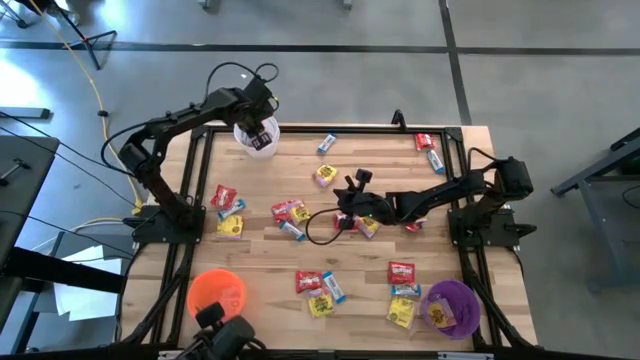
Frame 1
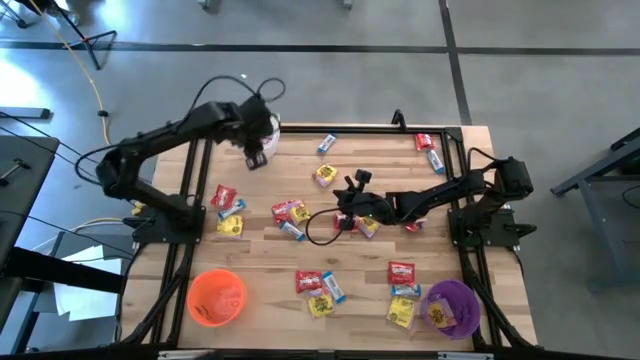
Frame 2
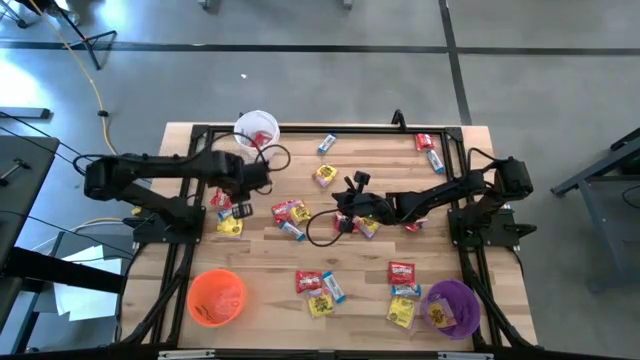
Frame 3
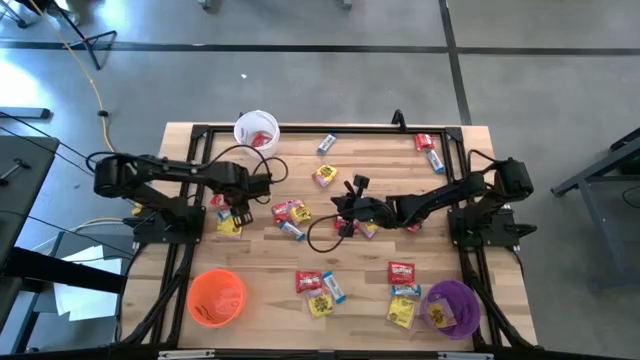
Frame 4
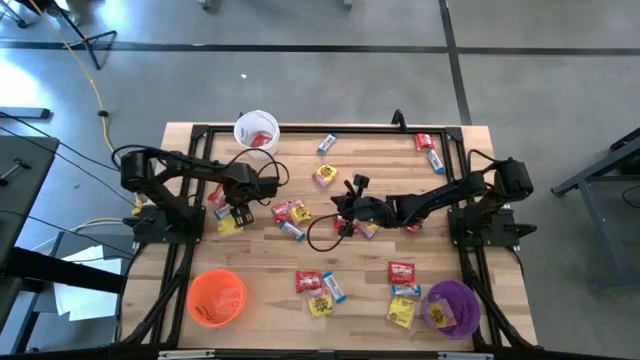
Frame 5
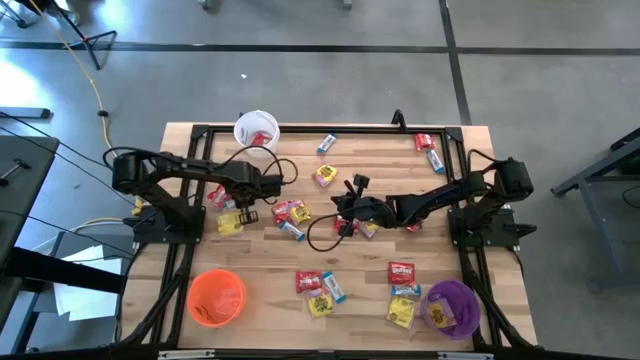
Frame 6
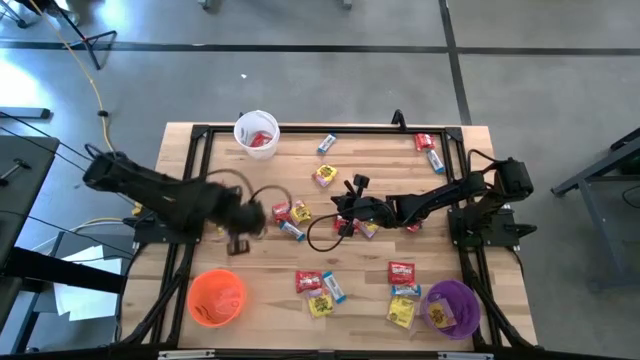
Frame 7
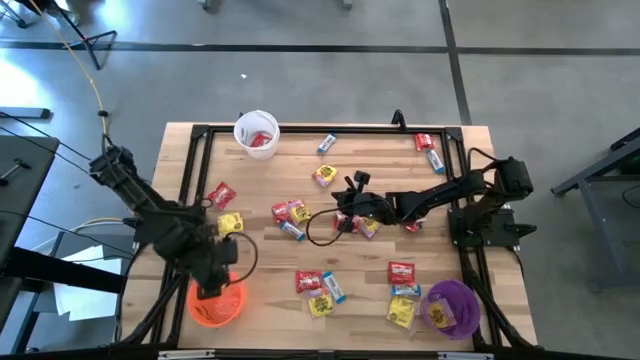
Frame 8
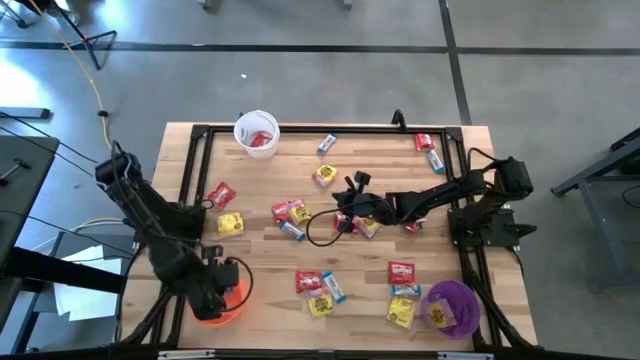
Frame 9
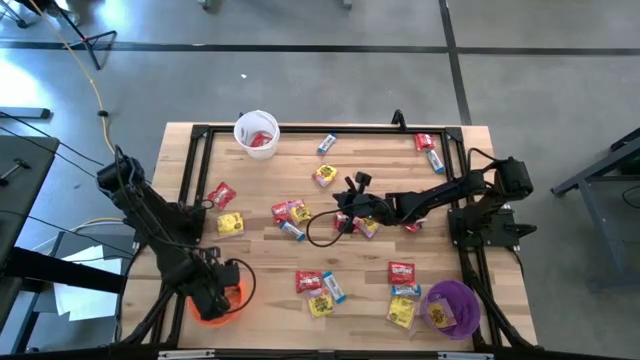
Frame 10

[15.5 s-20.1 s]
Task: Sort candy
Put the white candy into the orange bucket

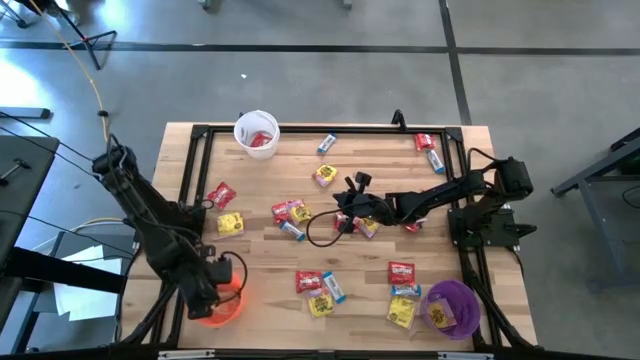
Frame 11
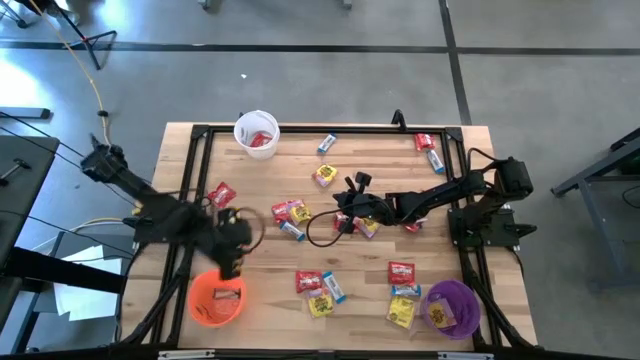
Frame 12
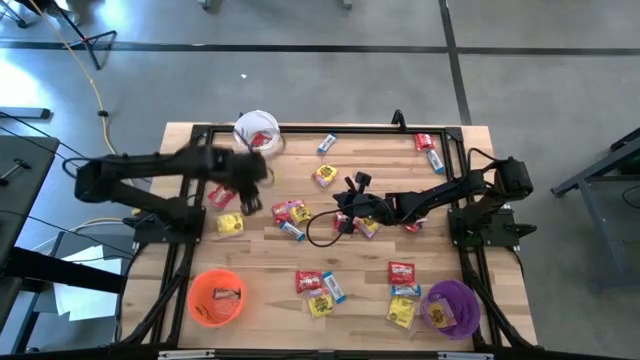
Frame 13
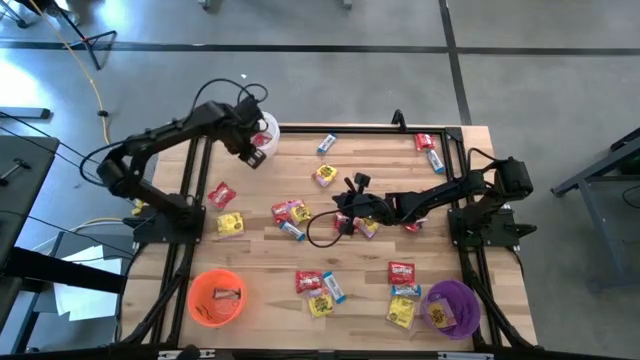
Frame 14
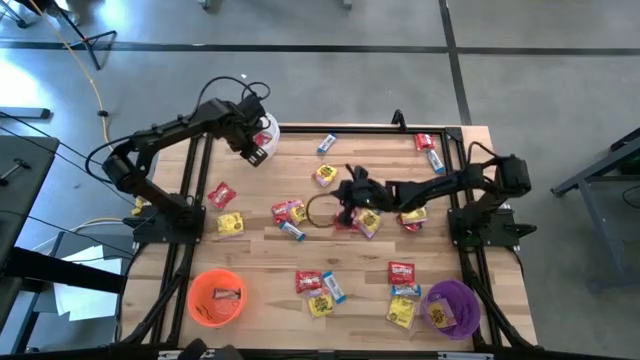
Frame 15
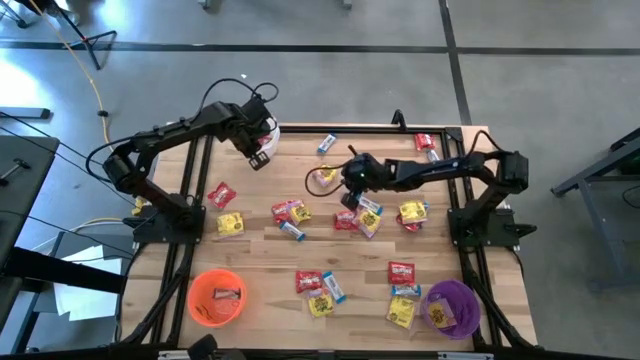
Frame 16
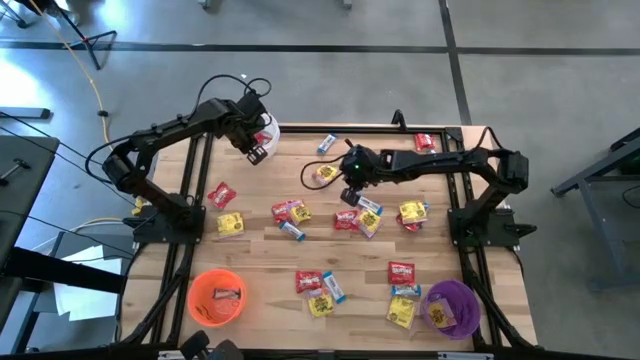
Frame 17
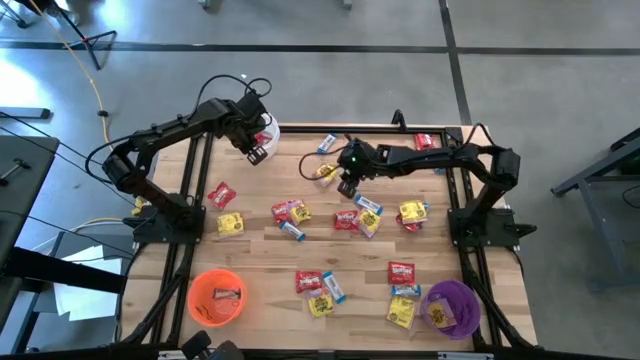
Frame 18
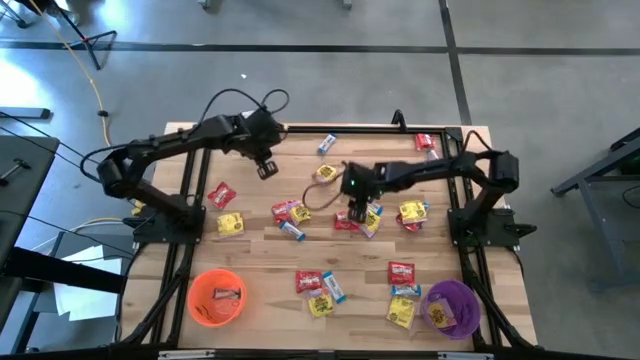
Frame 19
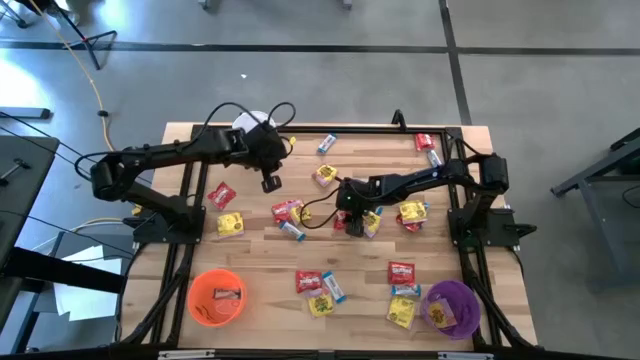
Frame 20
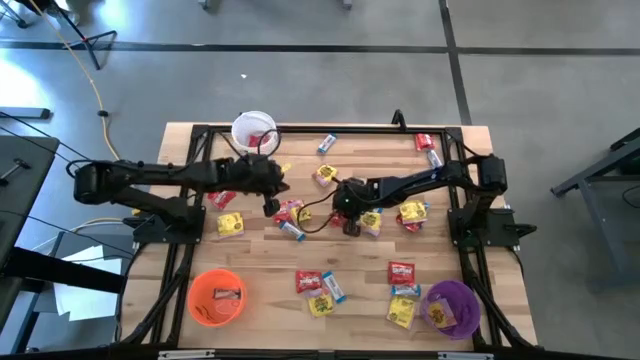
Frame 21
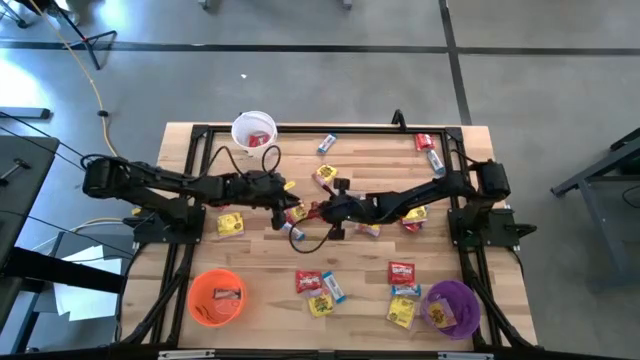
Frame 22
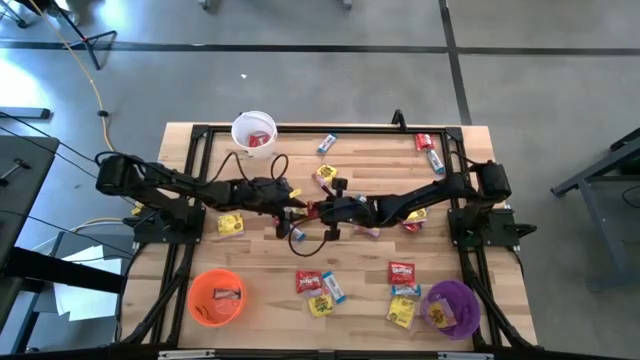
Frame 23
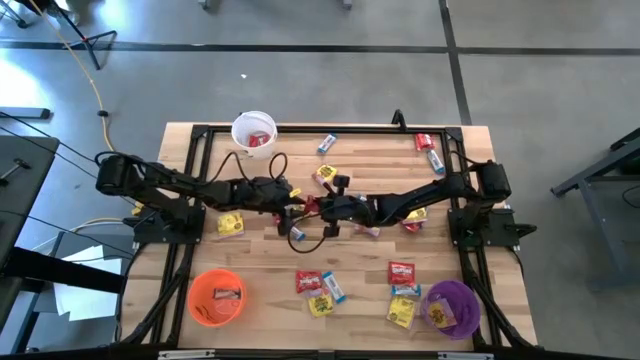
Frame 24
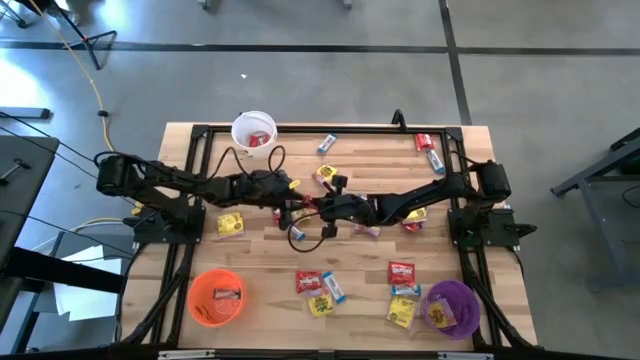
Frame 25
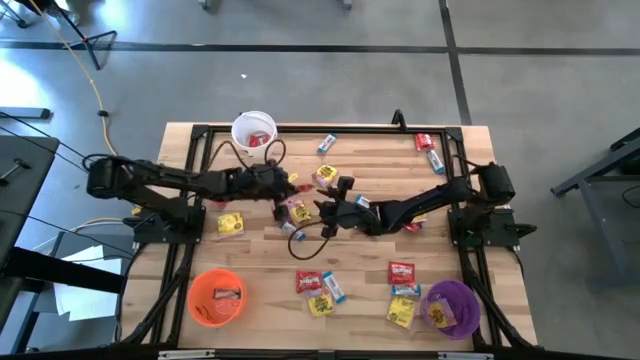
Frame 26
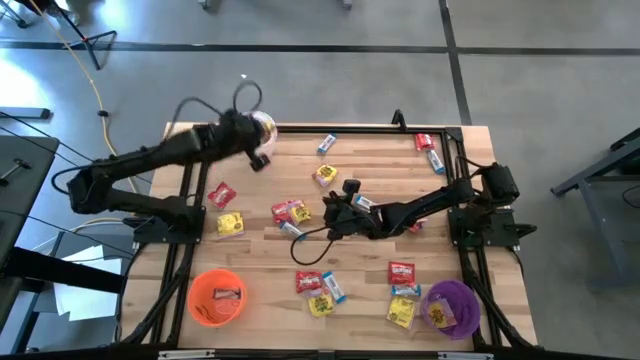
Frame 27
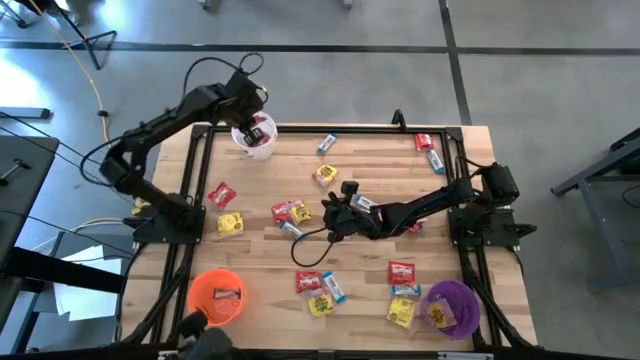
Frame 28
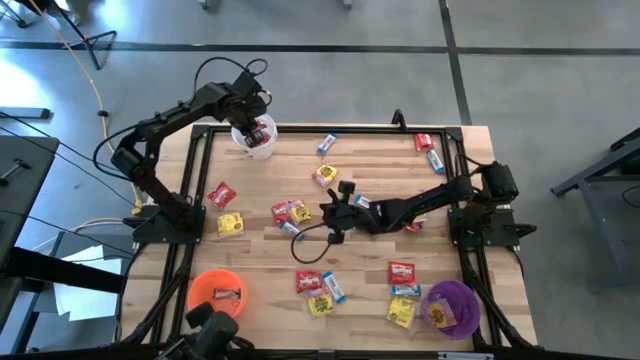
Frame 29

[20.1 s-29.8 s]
Put the red candy into the white bucket

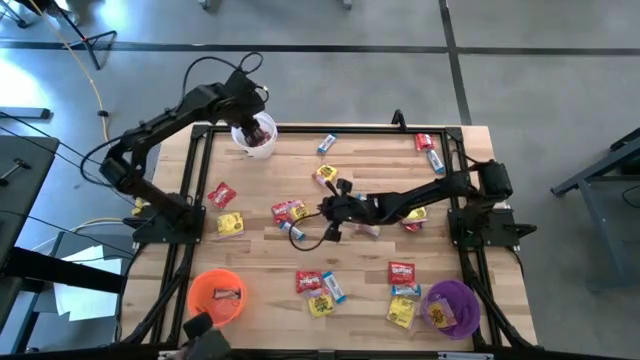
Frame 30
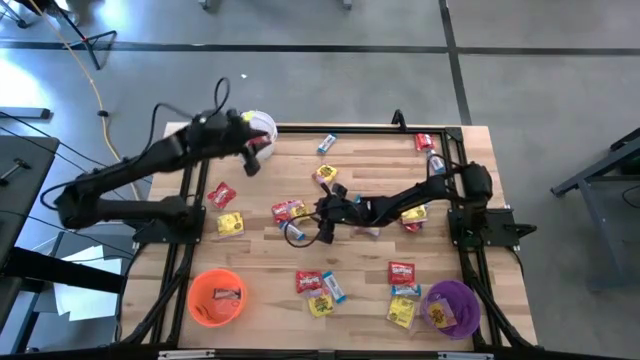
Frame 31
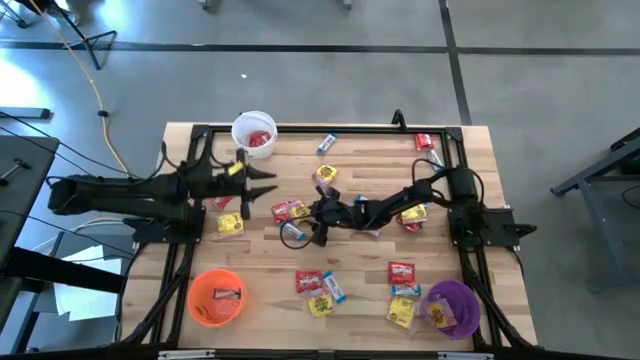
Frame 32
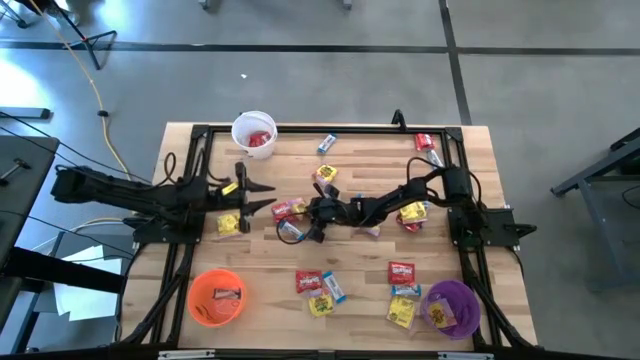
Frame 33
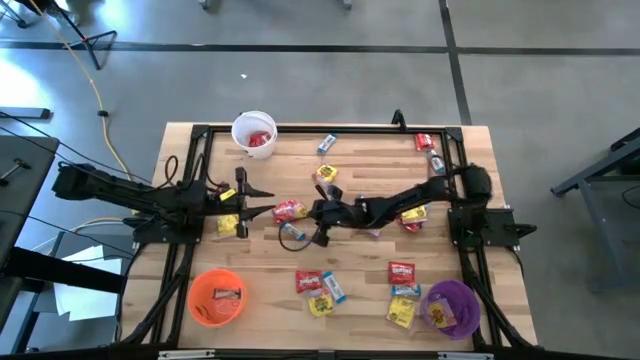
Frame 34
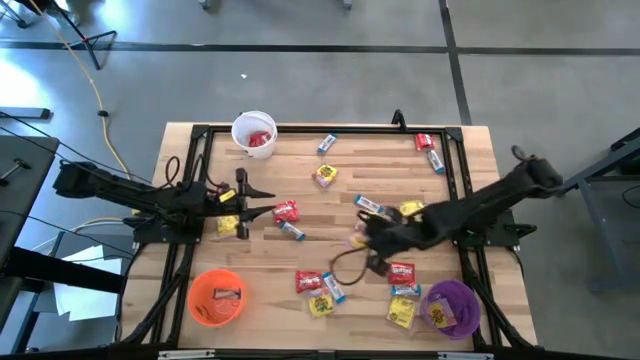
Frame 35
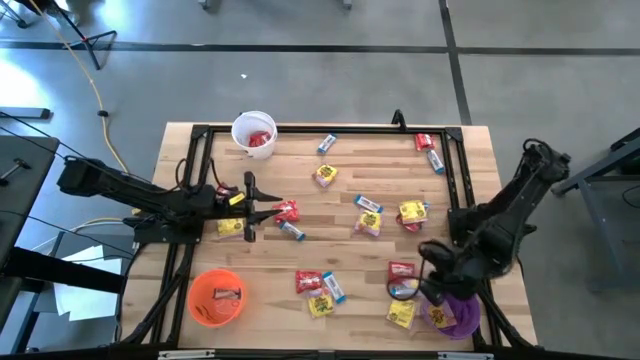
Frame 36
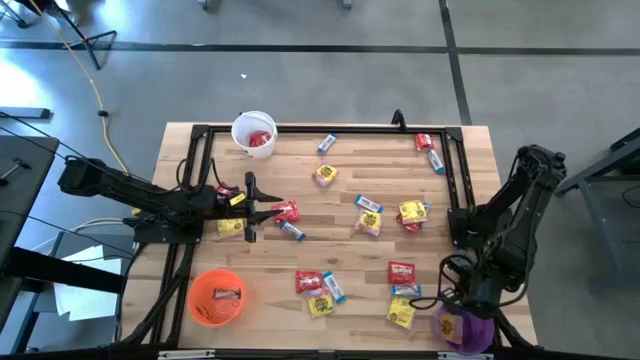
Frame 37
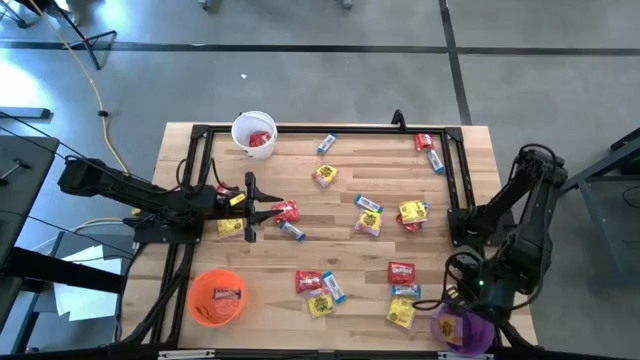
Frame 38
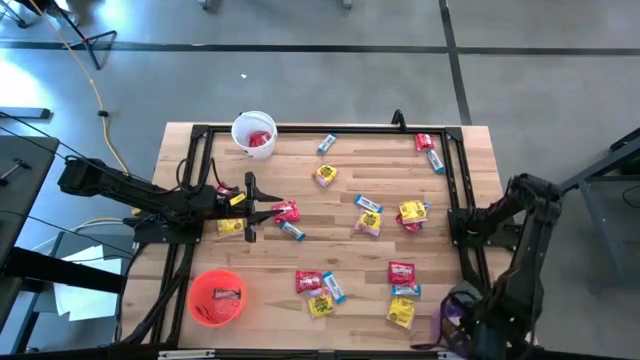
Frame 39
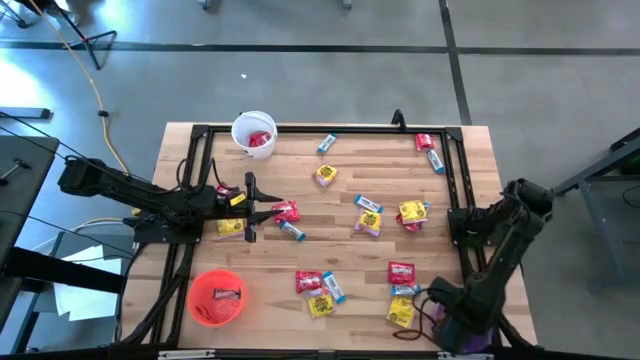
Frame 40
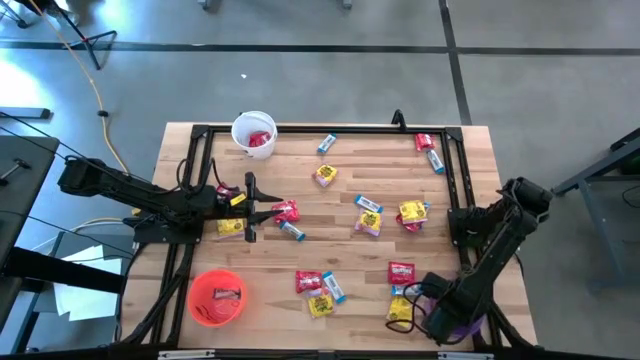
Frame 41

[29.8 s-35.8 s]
Put the yellow candy into the purple bucket

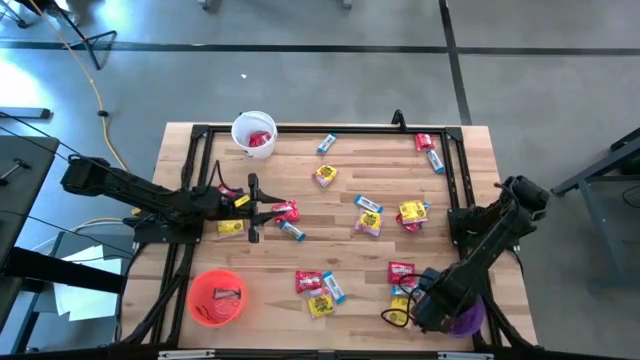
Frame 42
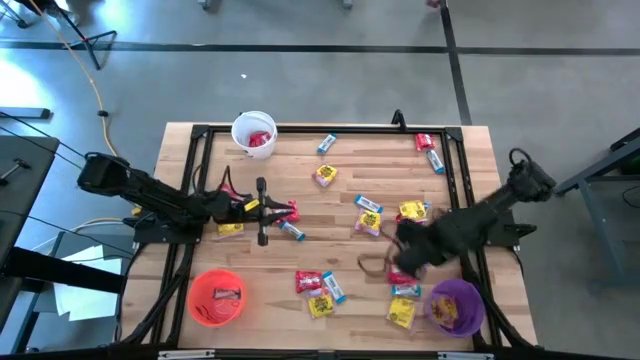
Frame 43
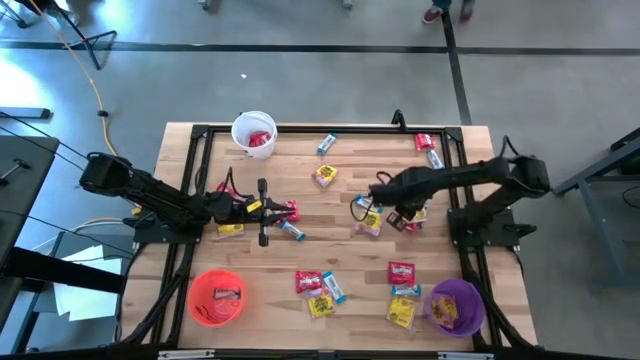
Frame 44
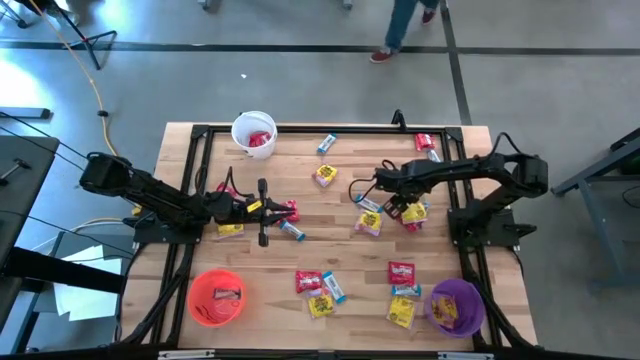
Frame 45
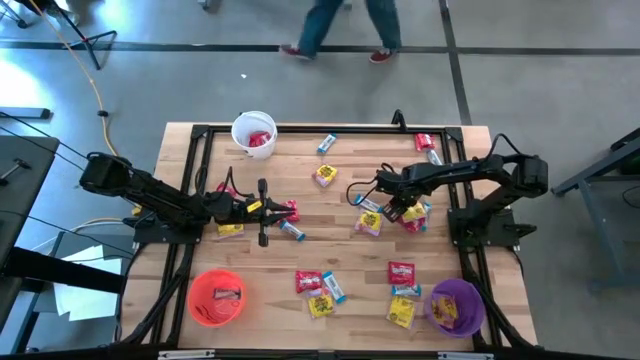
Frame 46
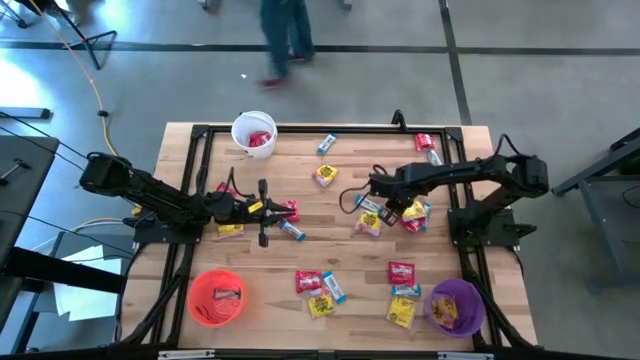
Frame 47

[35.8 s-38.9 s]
Put the yellow candy into the purple bucket
